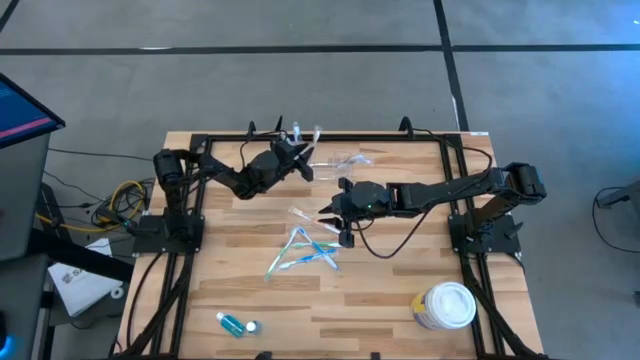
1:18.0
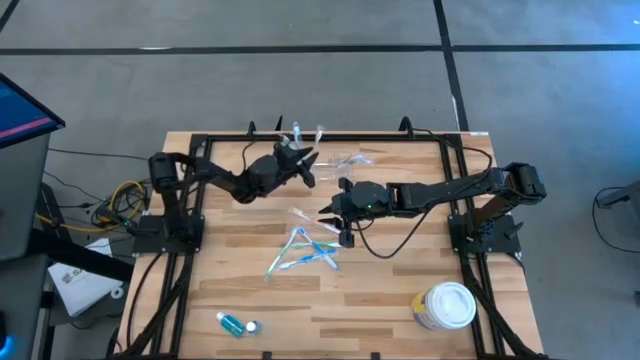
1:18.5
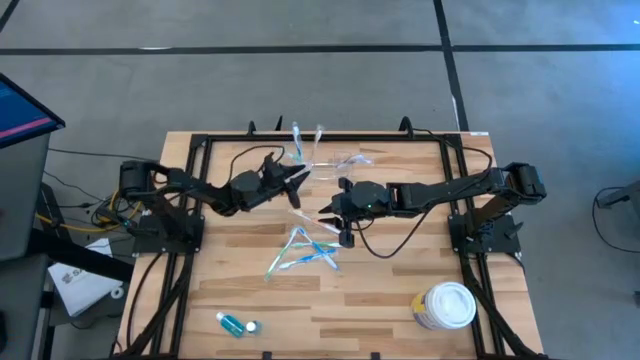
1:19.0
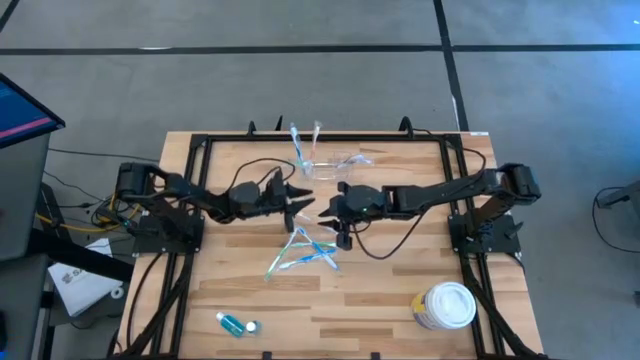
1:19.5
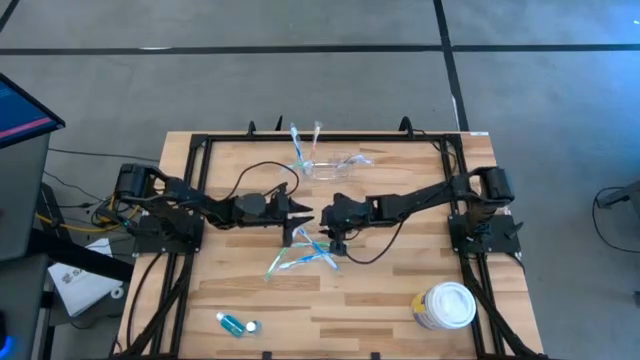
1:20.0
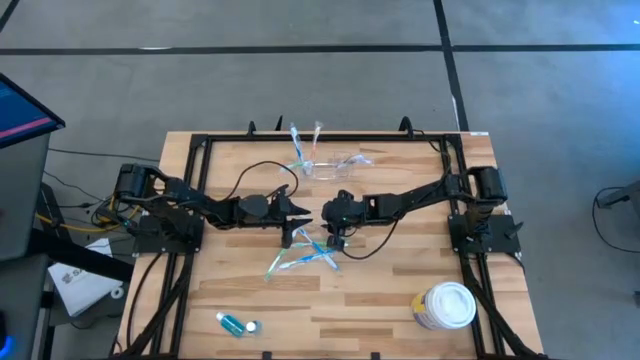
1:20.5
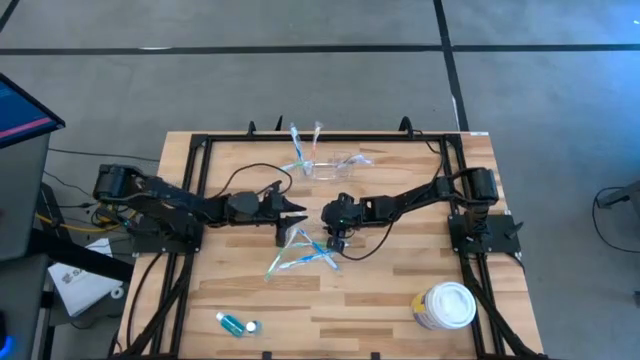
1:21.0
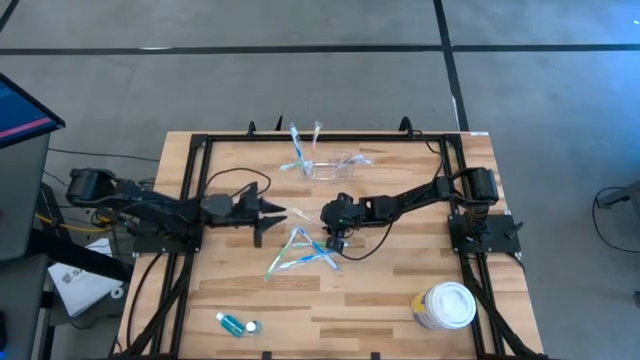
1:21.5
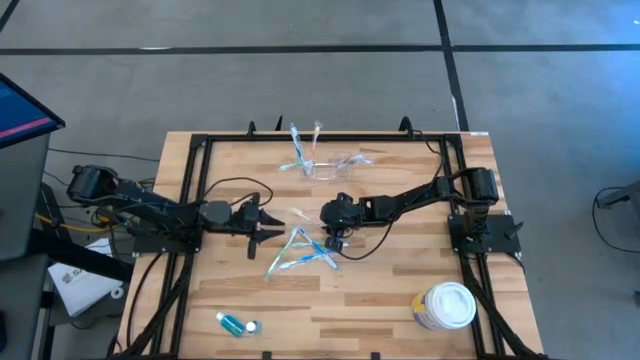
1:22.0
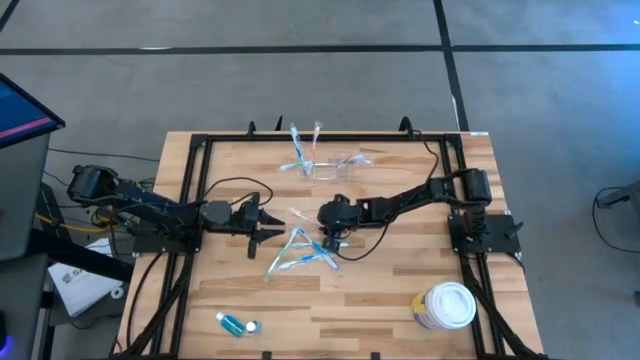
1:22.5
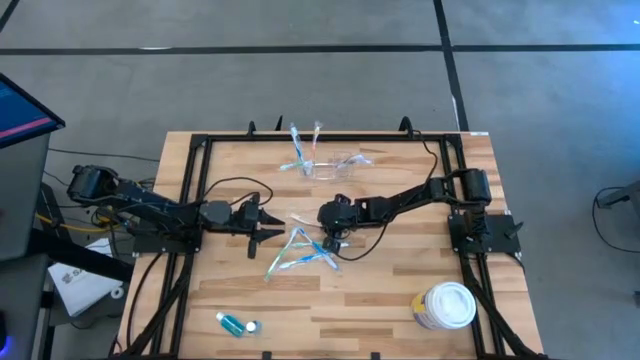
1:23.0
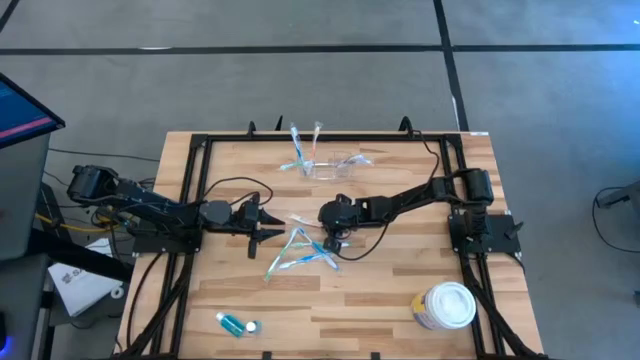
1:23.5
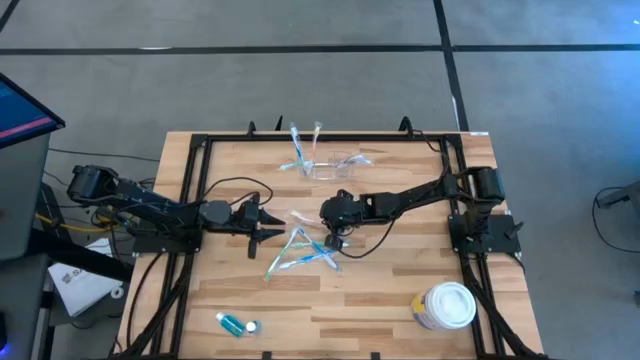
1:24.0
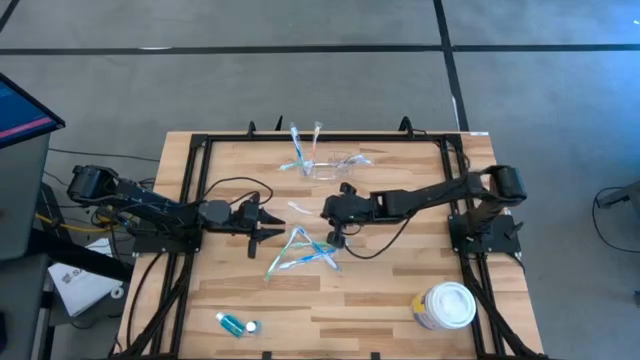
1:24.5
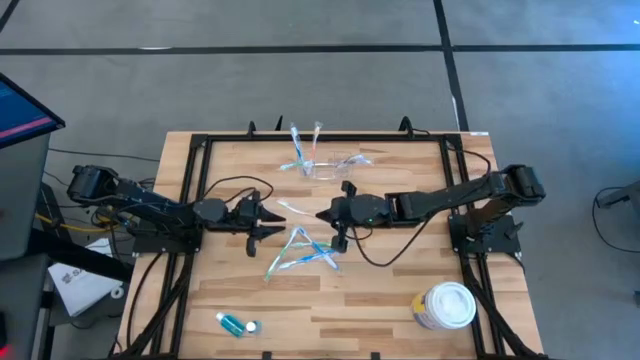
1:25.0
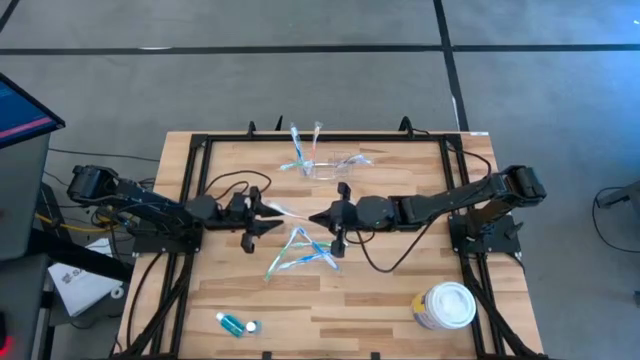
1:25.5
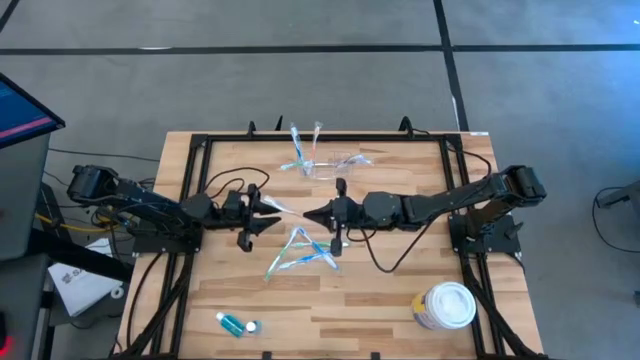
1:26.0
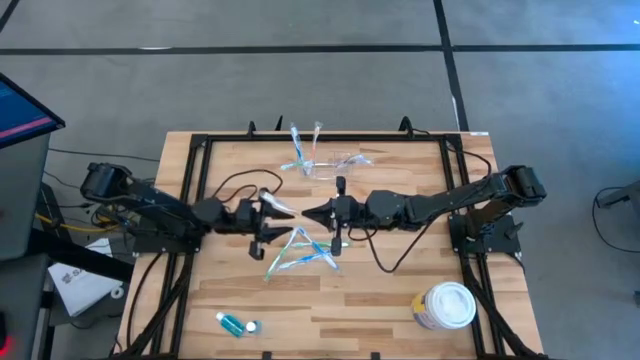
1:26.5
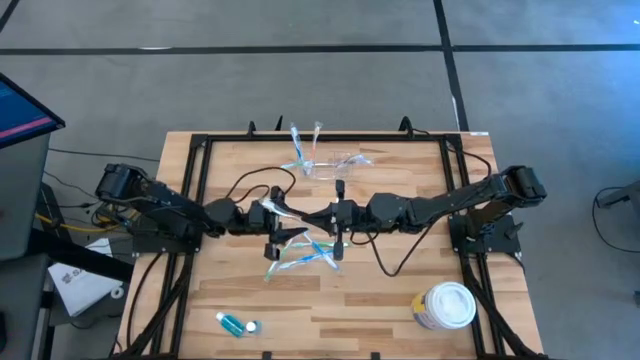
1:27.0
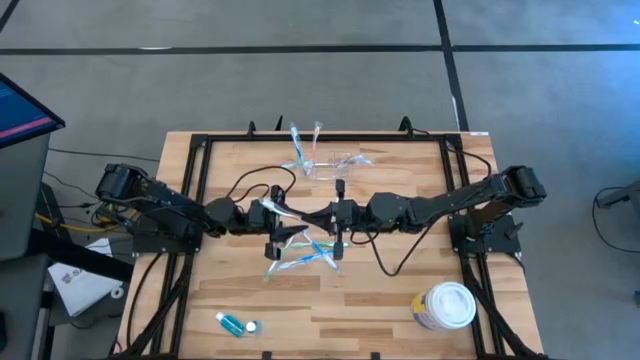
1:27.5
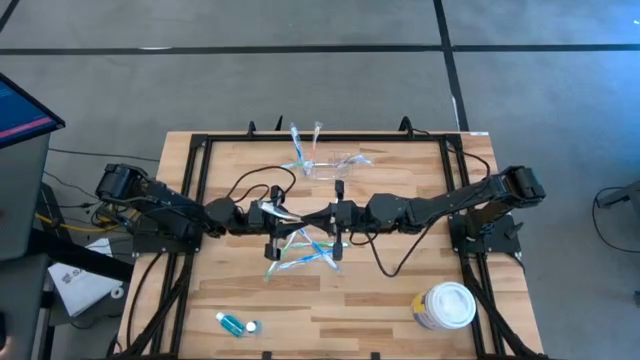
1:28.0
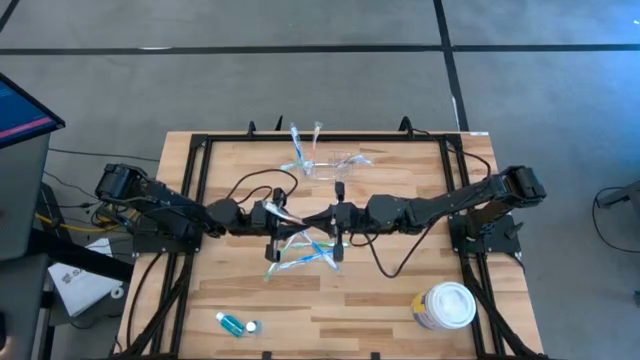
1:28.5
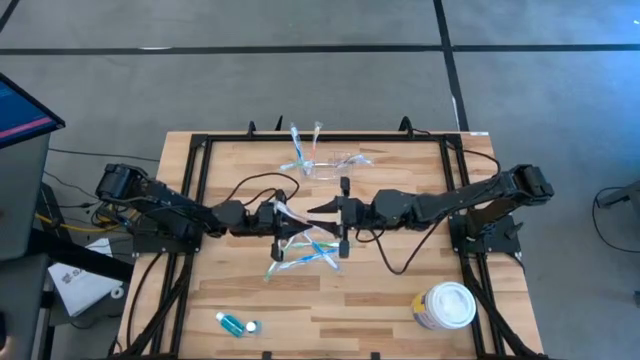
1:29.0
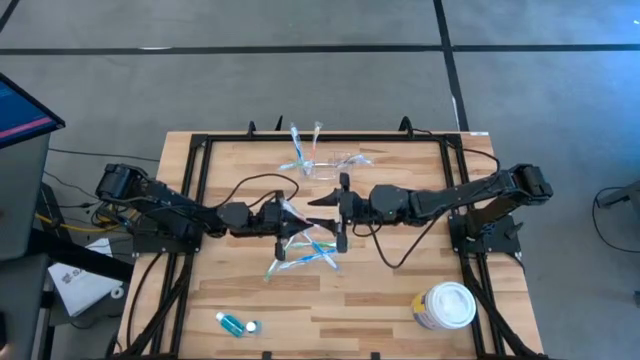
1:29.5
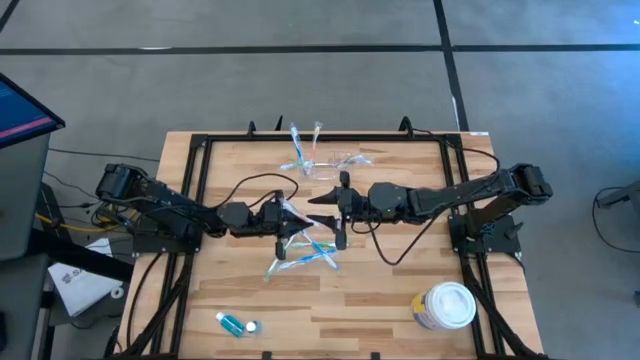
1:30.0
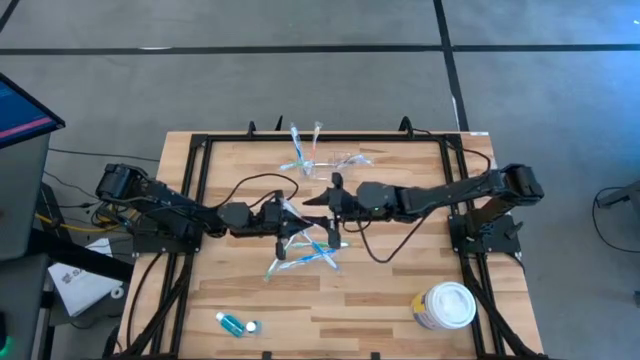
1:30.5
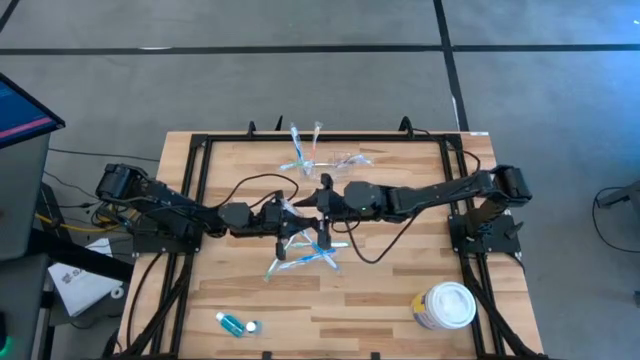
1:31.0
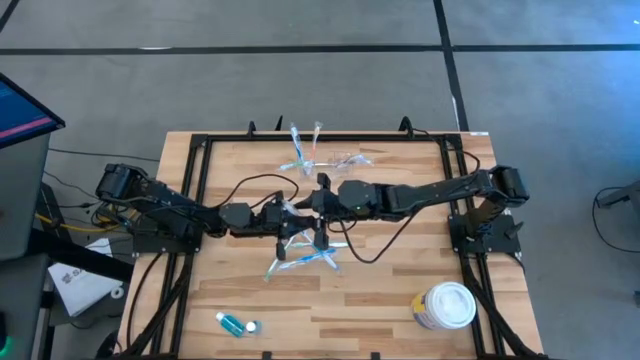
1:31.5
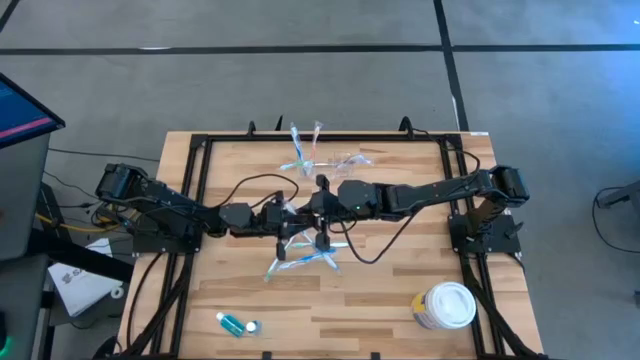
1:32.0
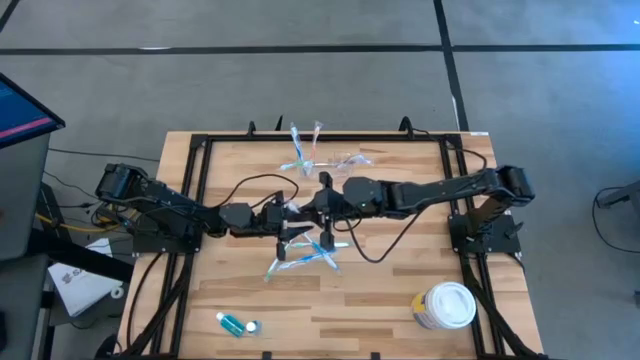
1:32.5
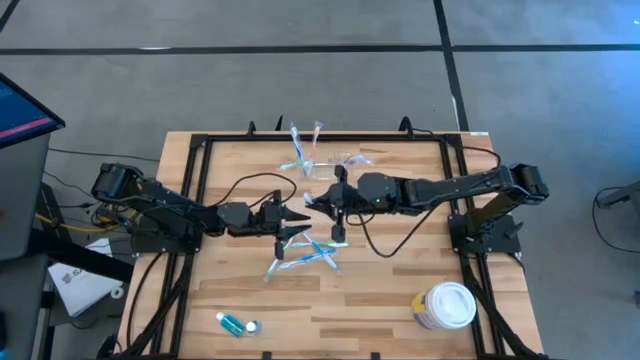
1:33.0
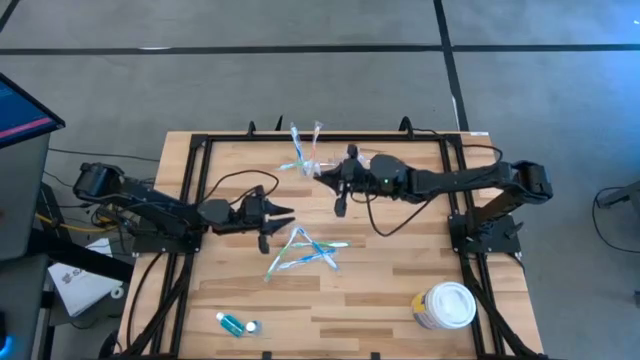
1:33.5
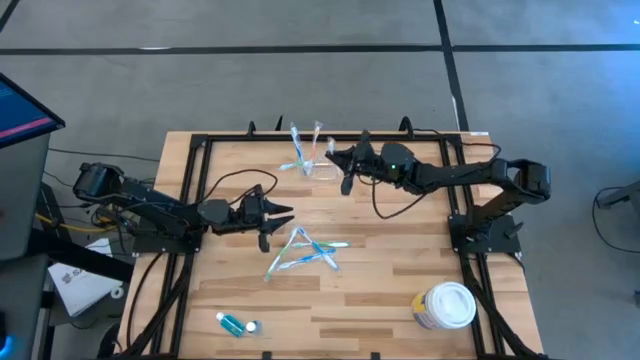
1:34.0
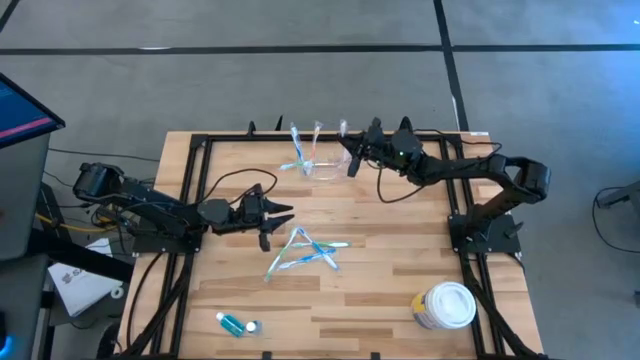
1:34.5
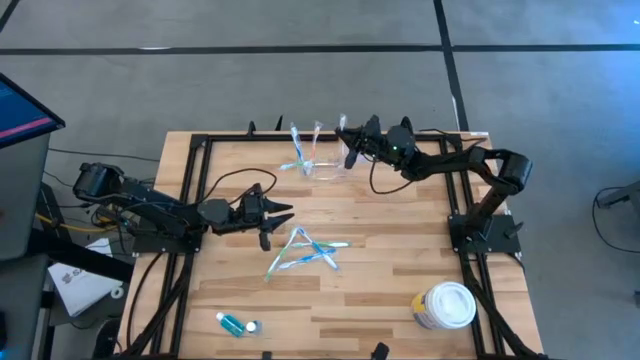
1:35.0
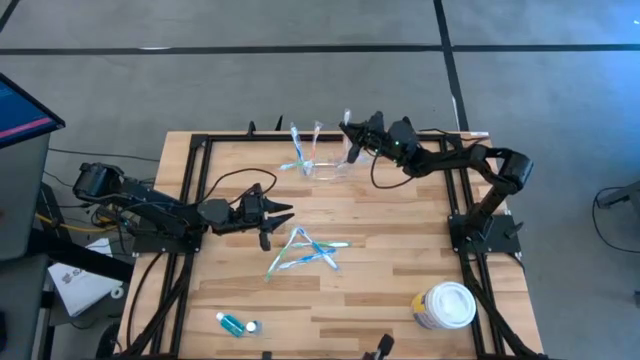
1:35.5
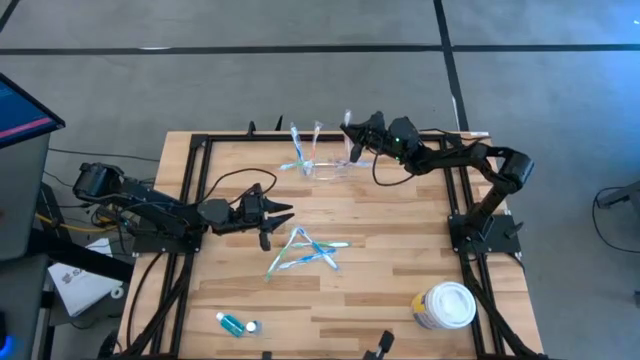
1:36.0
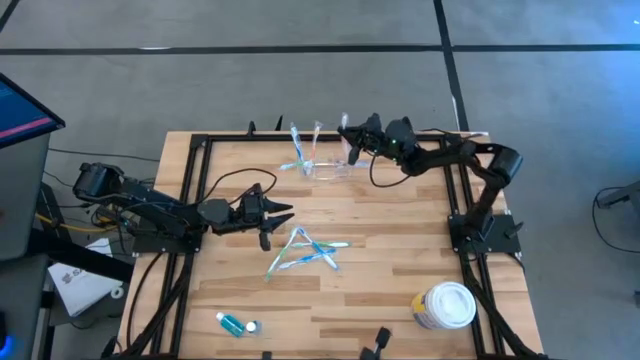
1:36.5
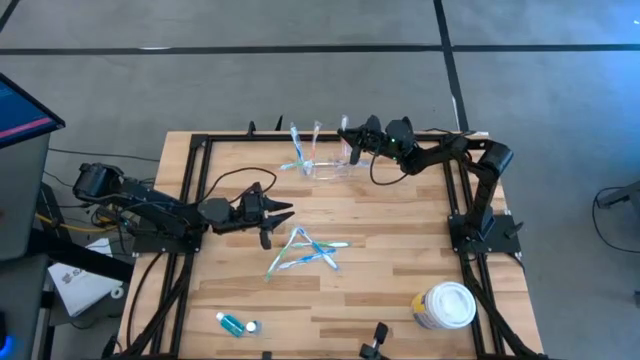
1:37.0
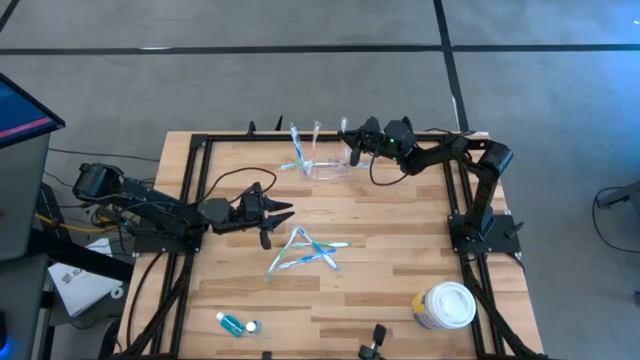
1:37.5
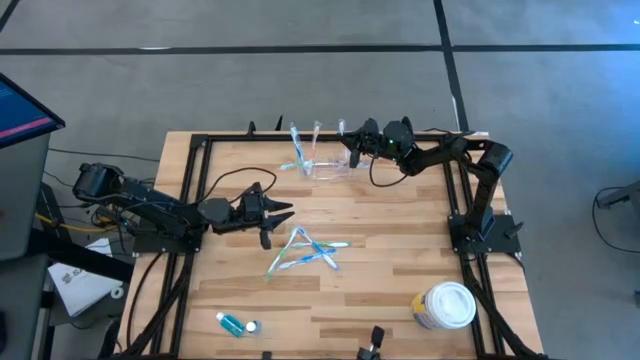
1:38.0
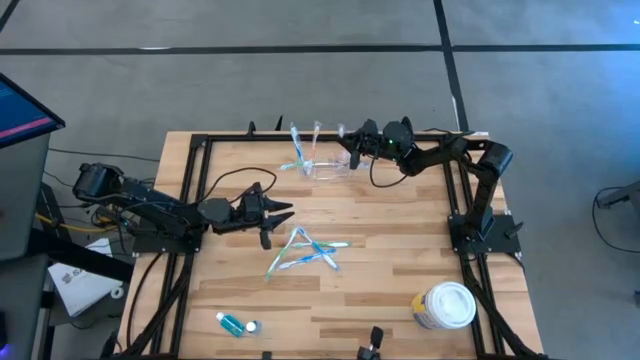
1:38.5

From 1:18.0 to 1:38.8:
Task: Pick & Place toothbrushing station
Put the orange toothbrush into the transparent organizer
